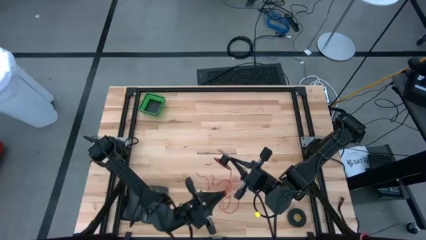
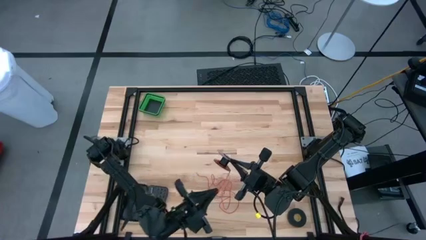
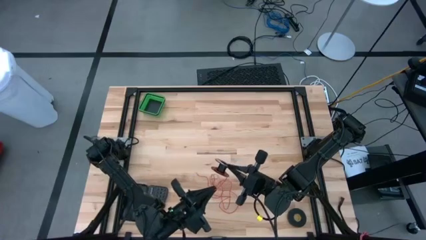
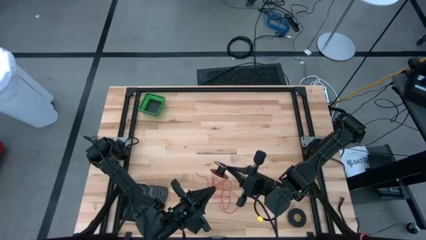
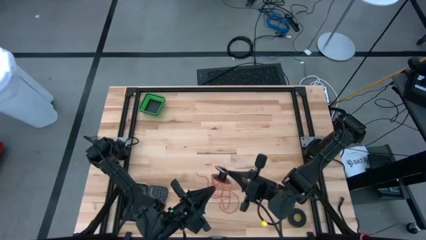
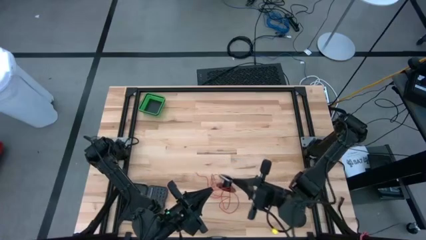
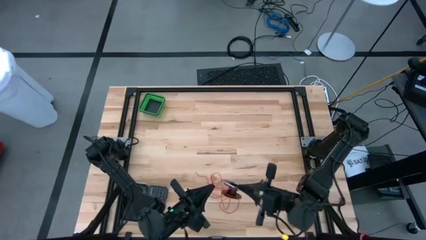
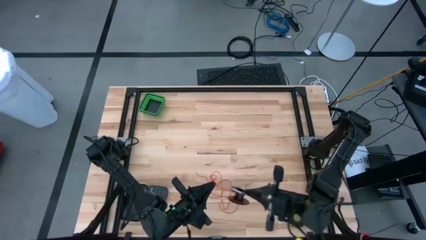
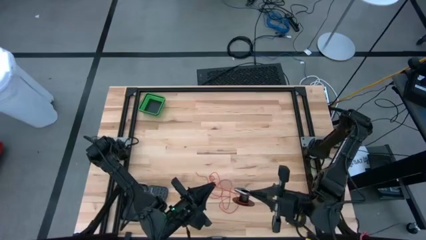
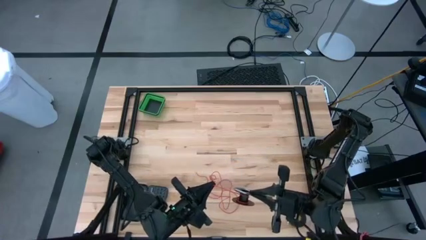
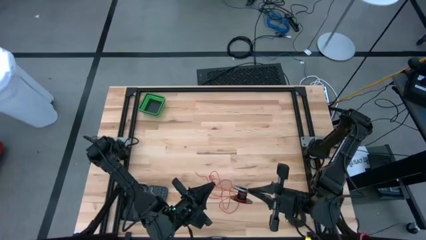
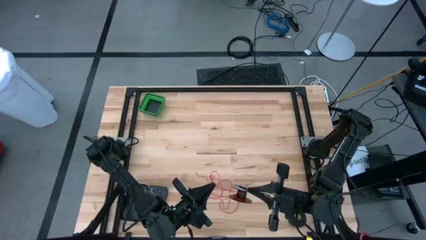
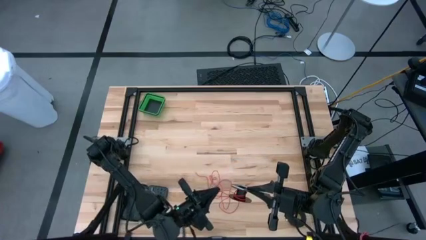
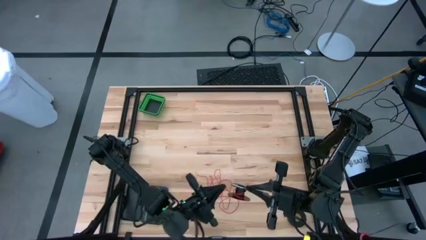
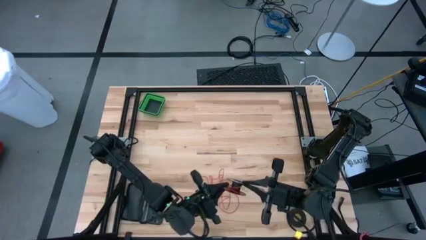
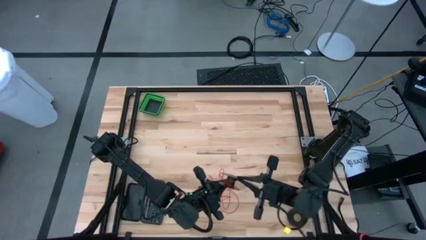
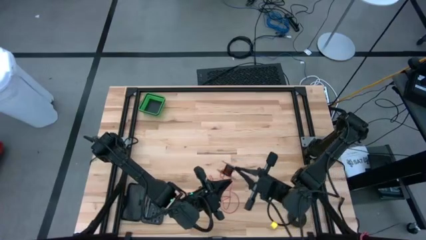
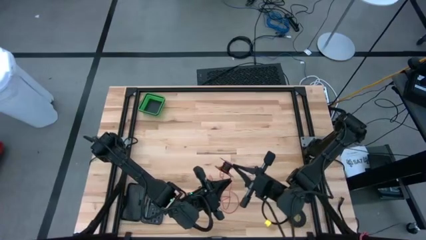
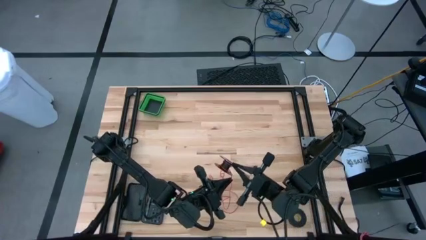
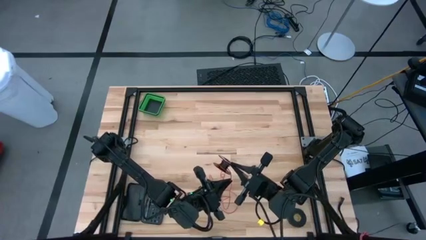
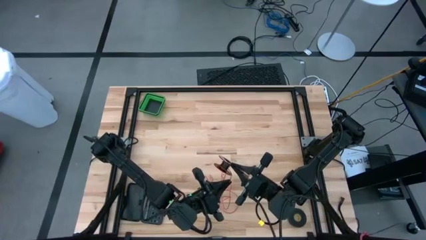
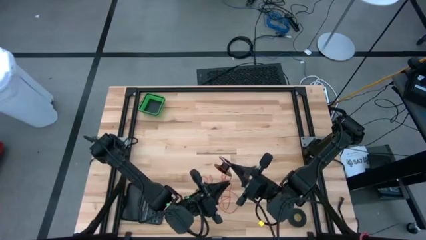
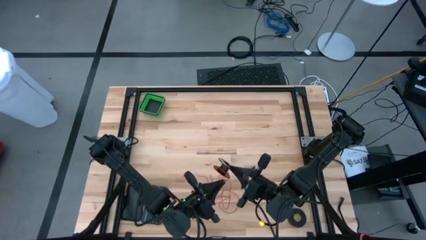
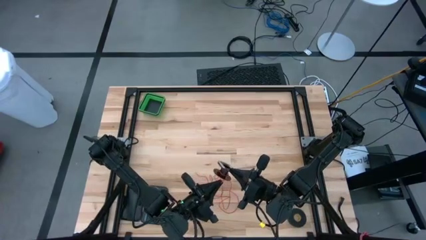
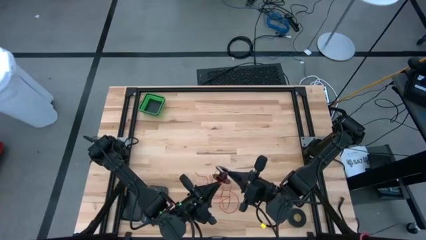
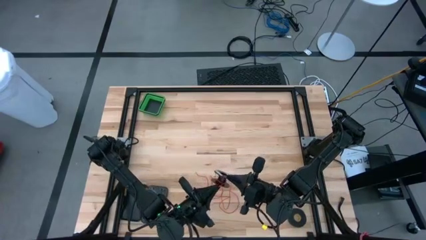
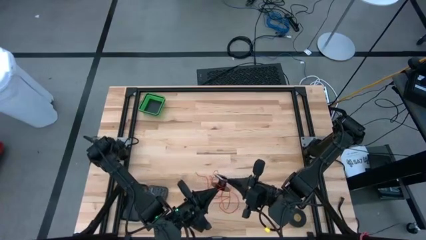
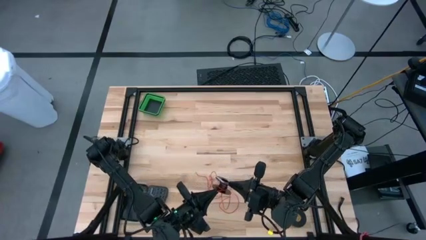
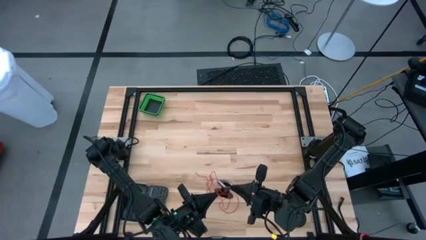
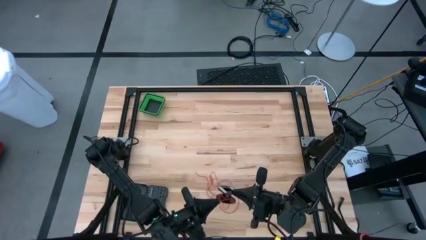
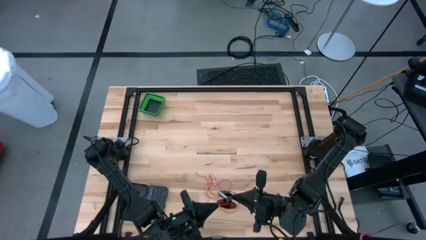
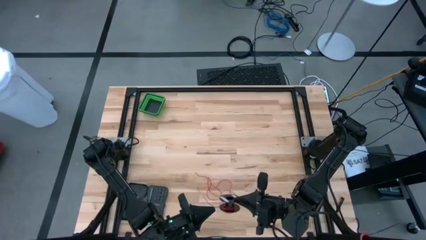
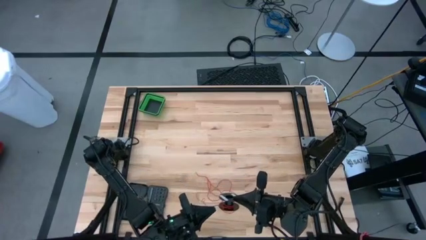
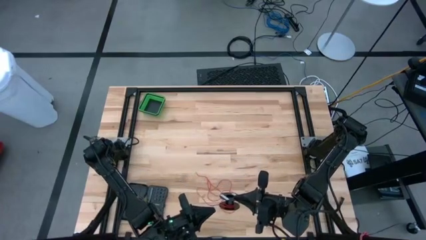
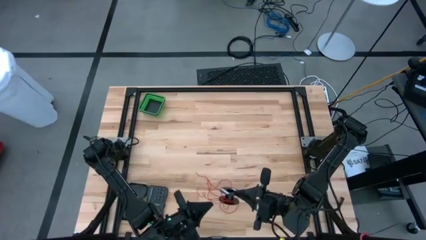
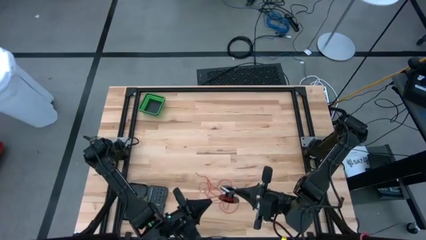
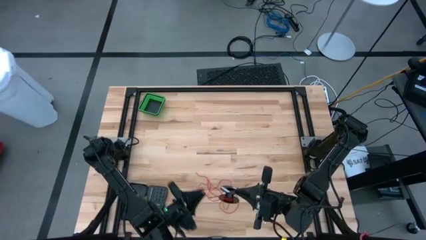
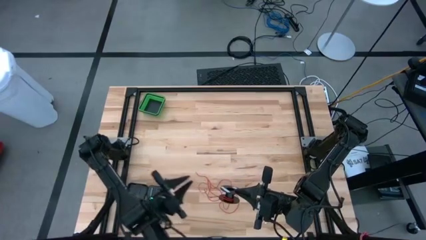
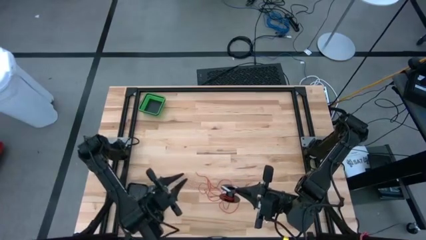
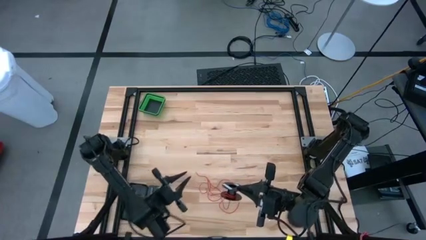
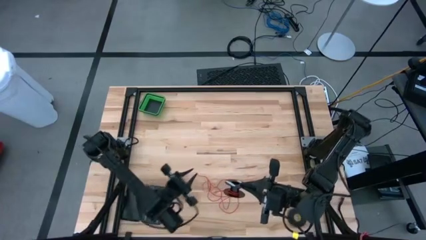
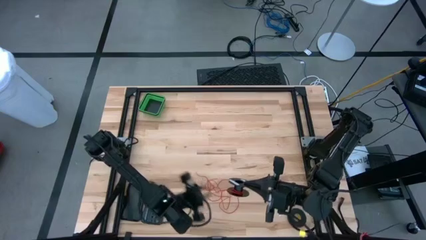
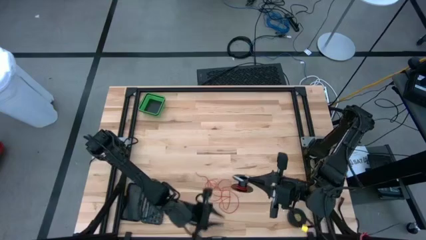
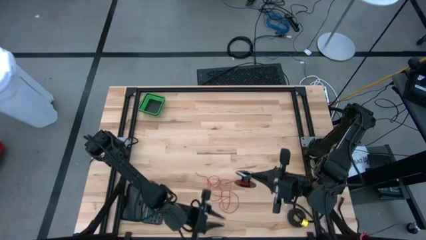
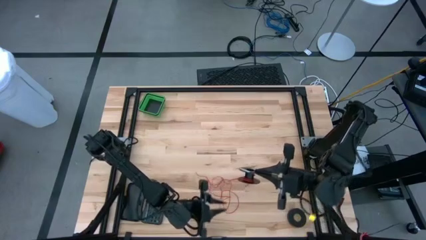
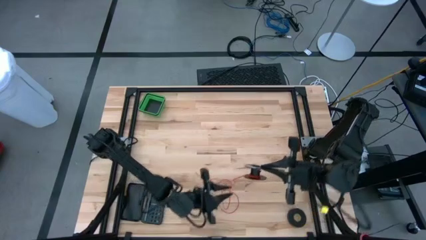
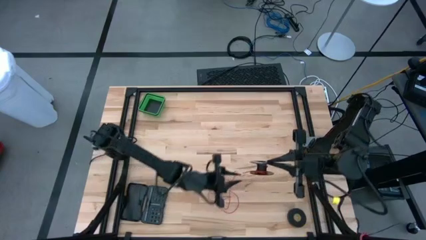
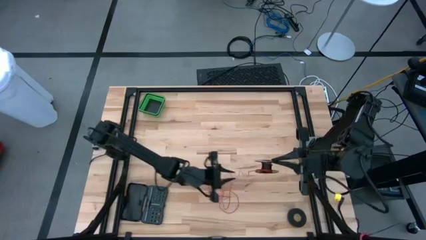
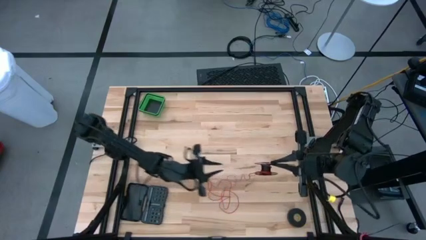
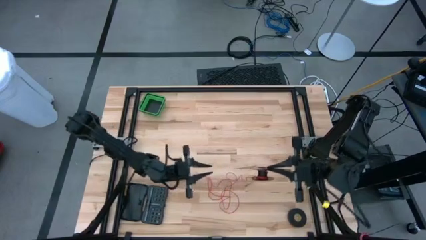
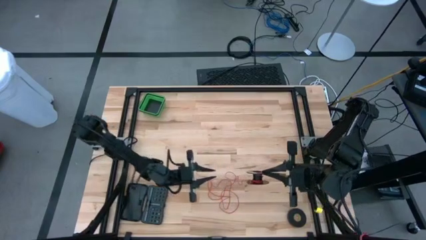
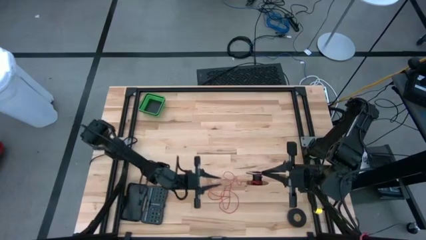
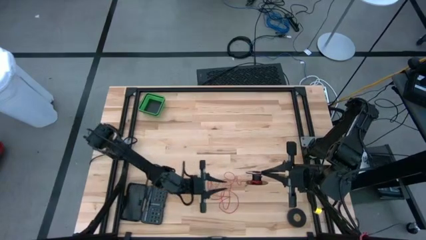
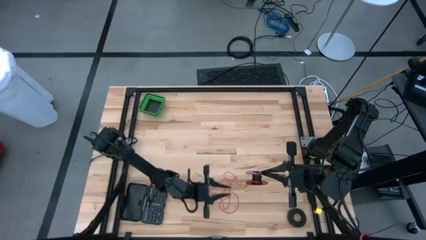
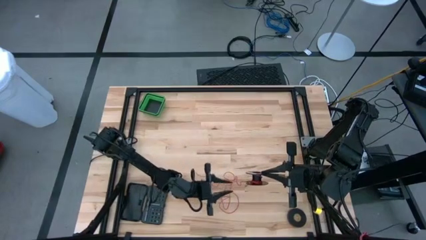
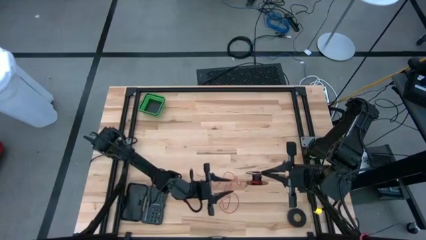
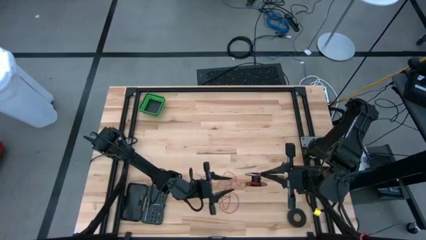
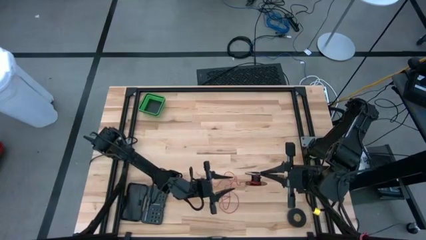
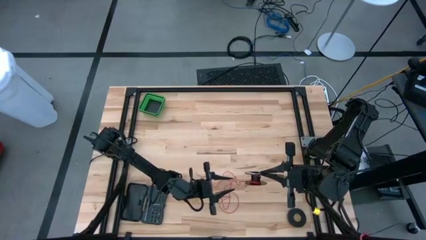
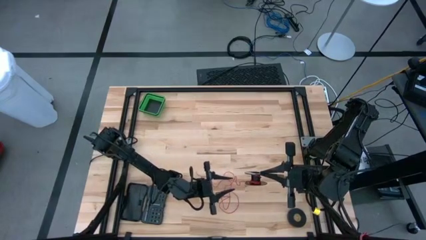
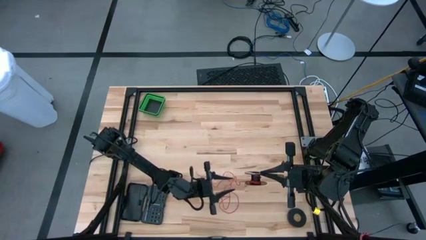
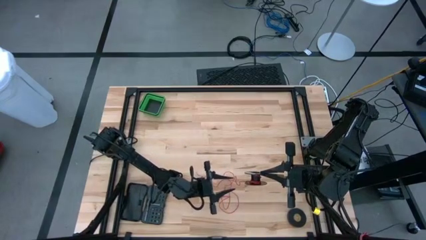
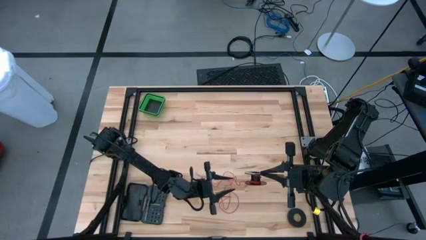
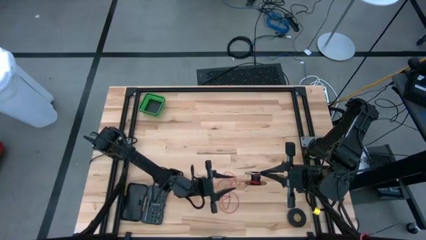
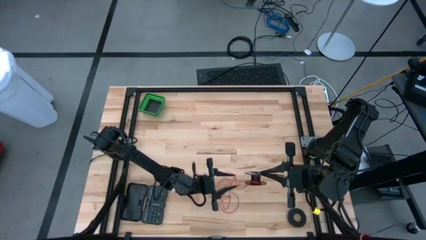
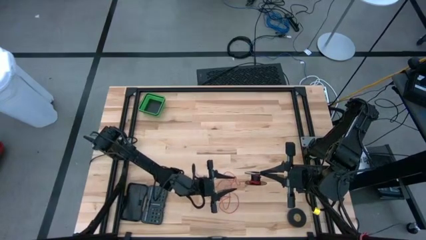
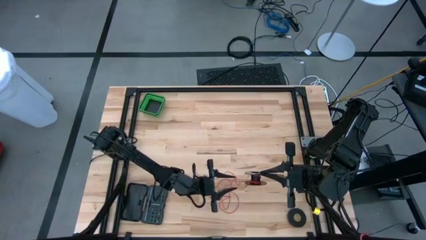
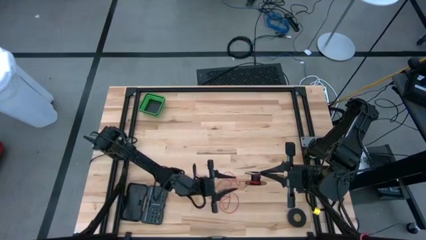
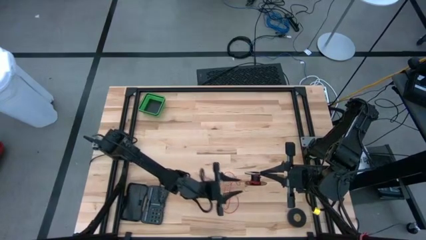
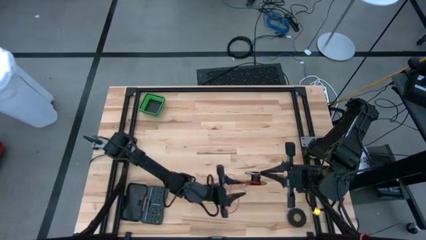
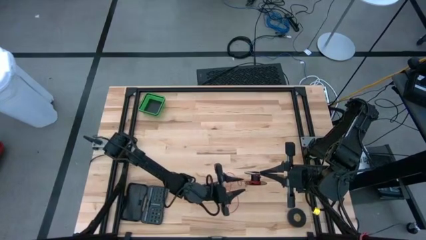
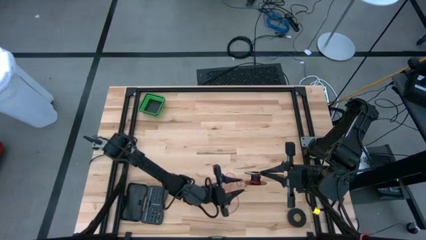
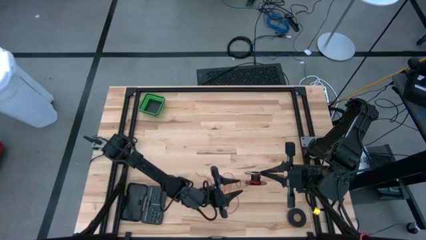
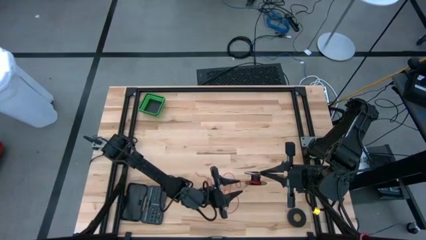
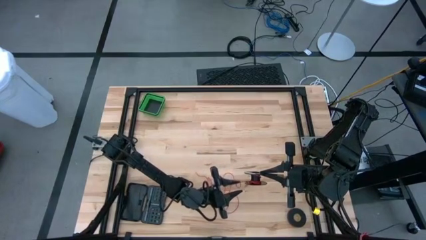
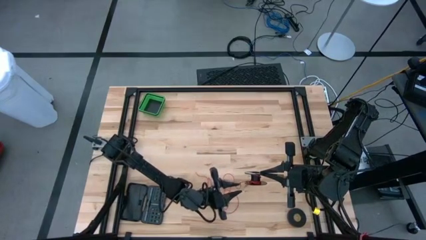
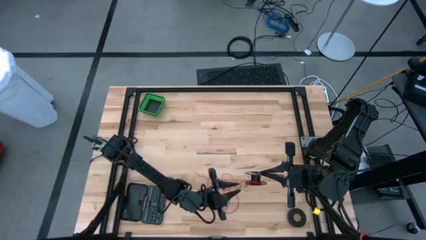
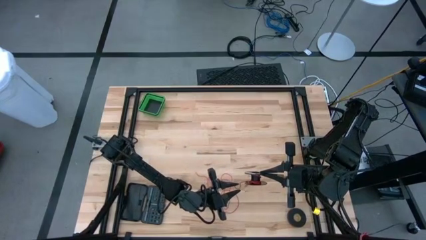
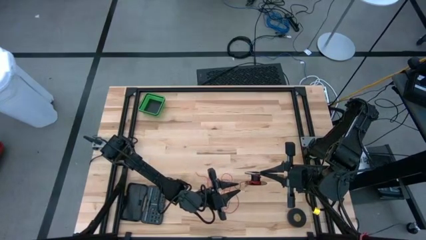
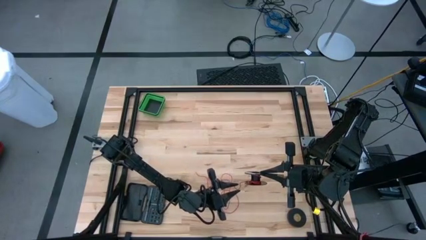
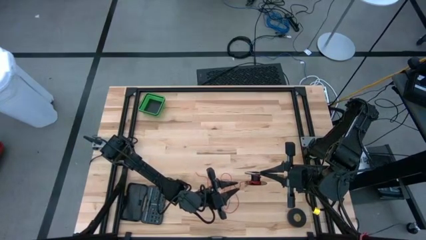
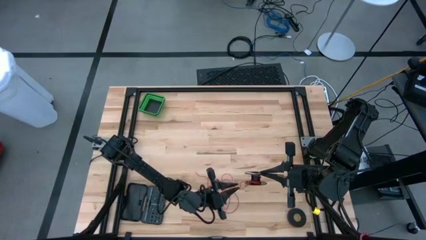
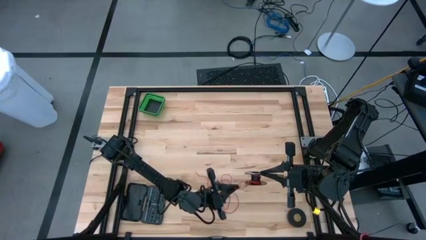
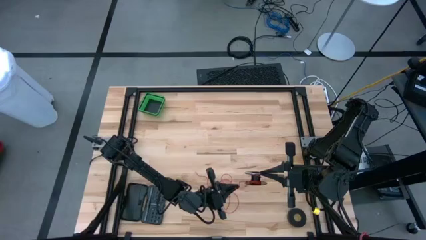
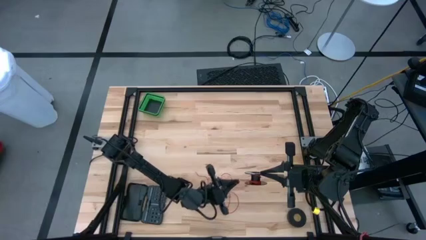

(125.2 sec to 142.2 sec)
Task: Coil cords
Coil the red wire into the spool
